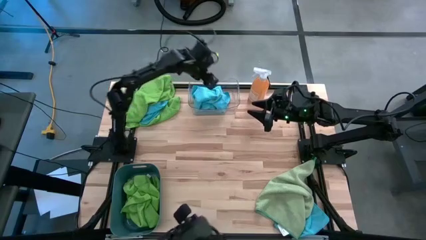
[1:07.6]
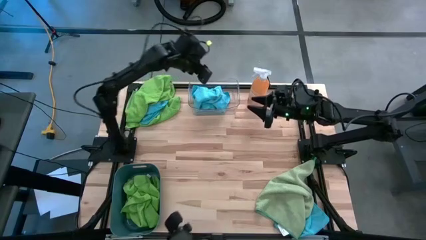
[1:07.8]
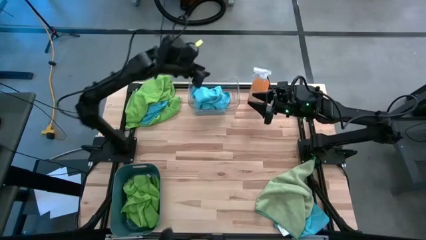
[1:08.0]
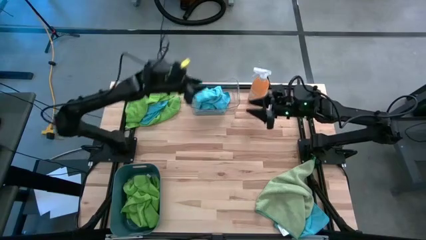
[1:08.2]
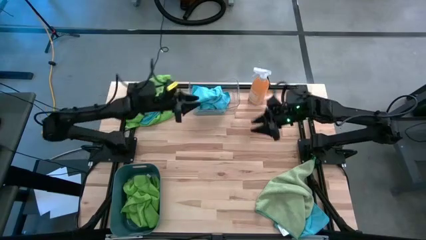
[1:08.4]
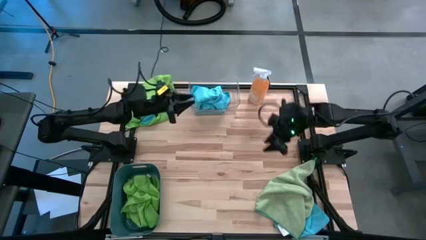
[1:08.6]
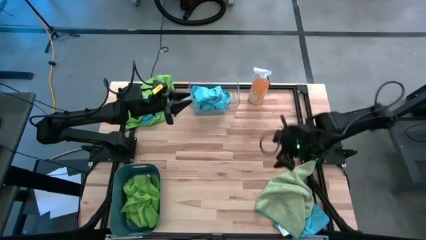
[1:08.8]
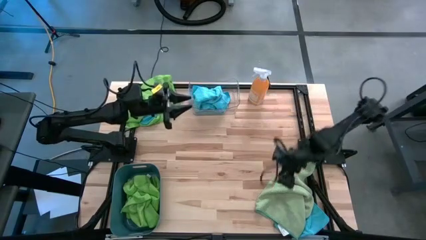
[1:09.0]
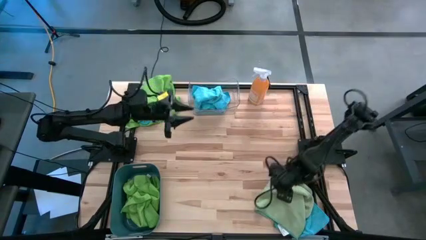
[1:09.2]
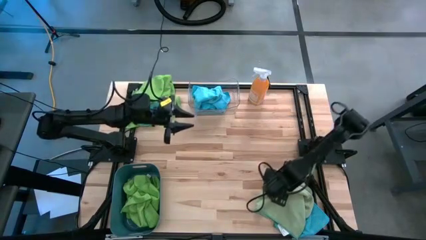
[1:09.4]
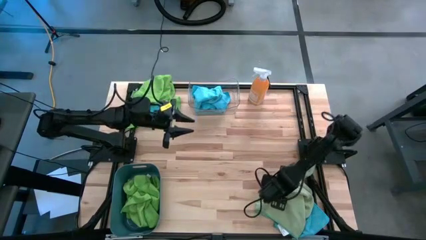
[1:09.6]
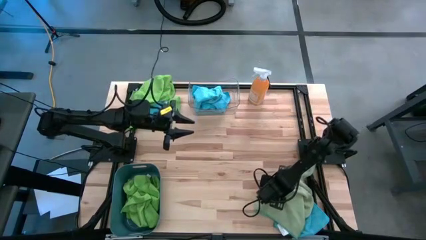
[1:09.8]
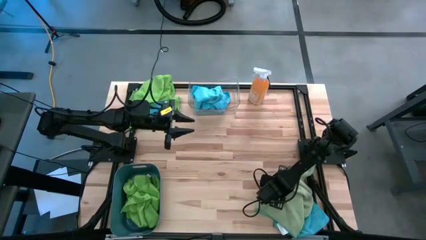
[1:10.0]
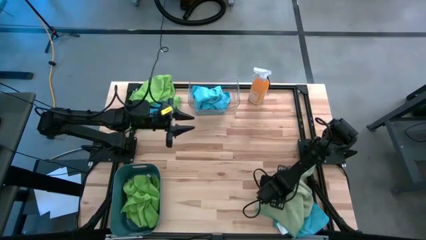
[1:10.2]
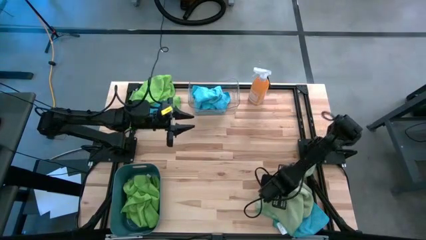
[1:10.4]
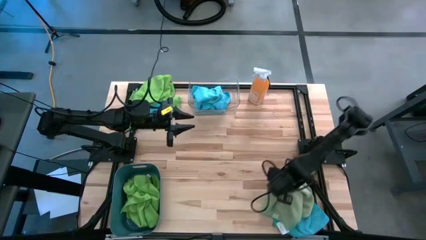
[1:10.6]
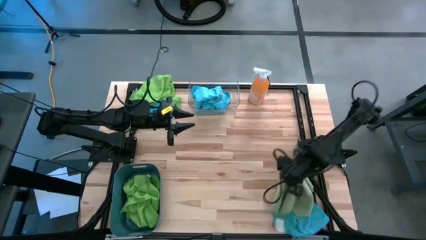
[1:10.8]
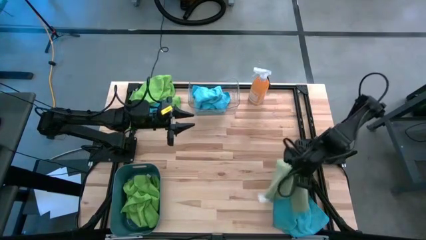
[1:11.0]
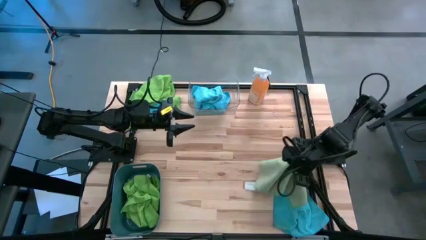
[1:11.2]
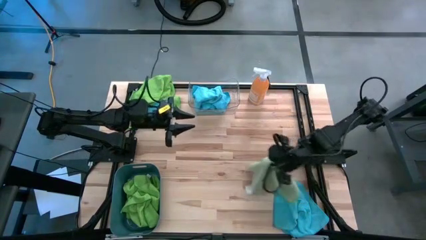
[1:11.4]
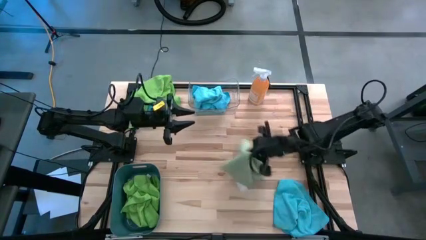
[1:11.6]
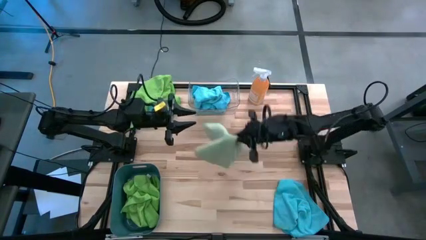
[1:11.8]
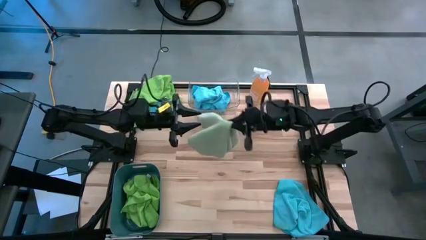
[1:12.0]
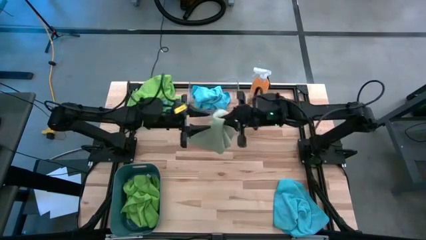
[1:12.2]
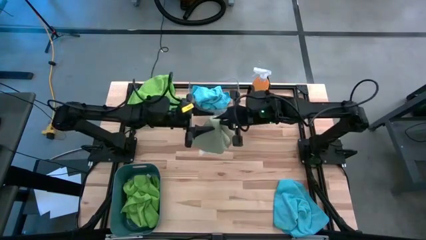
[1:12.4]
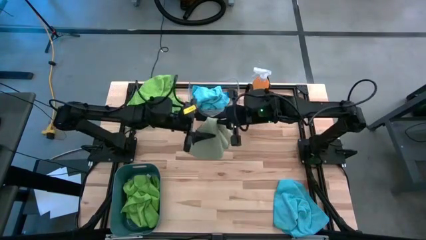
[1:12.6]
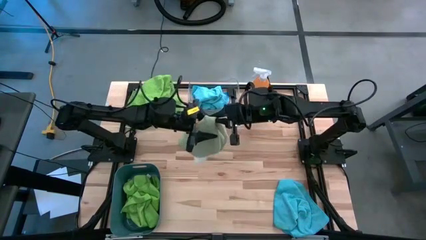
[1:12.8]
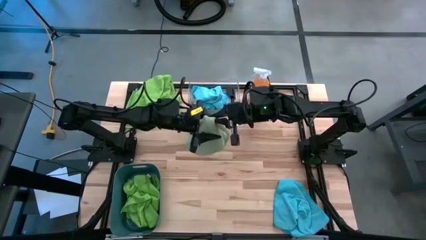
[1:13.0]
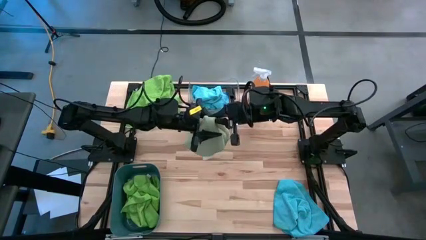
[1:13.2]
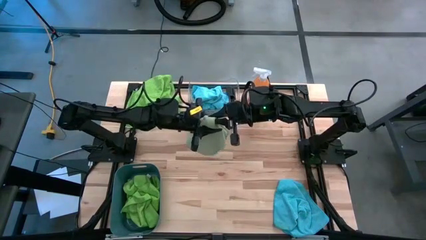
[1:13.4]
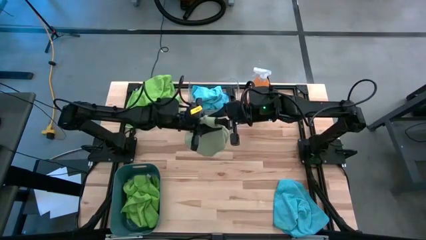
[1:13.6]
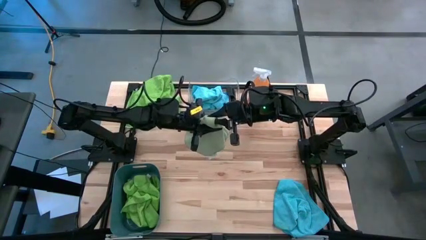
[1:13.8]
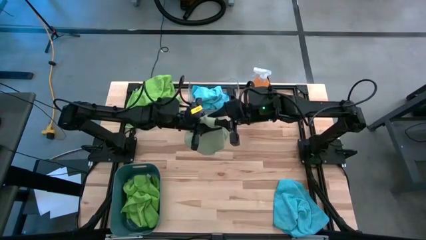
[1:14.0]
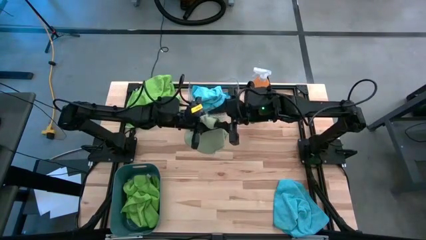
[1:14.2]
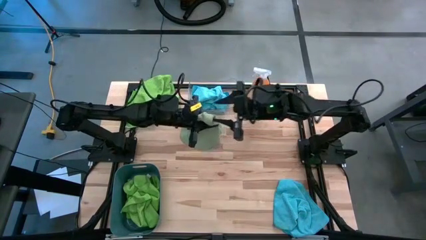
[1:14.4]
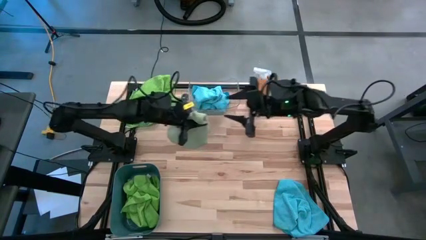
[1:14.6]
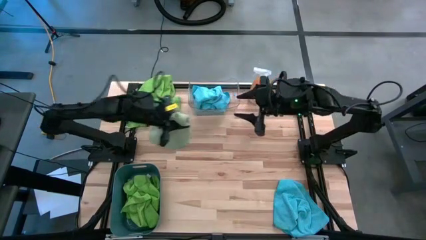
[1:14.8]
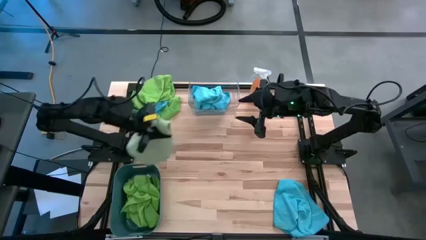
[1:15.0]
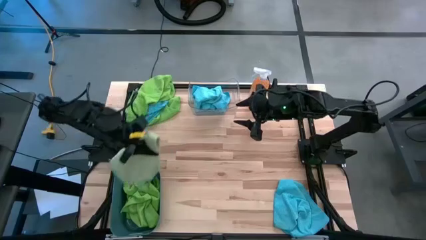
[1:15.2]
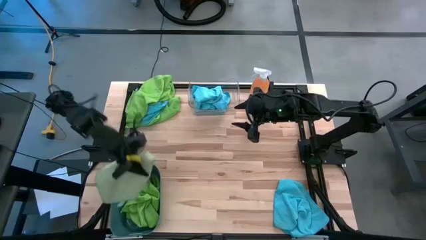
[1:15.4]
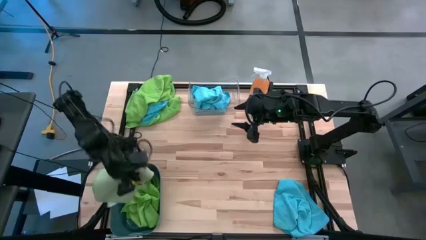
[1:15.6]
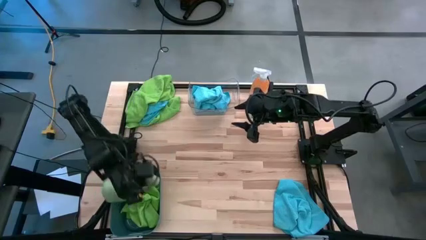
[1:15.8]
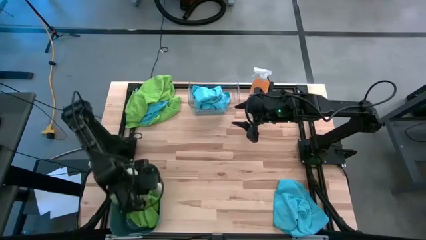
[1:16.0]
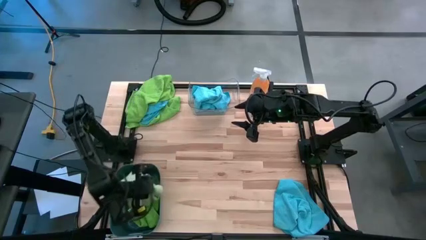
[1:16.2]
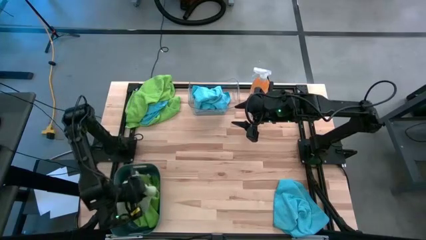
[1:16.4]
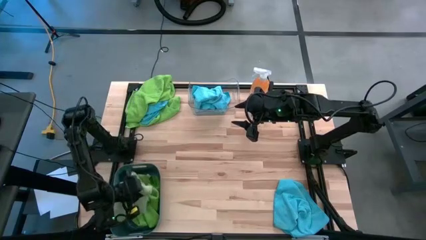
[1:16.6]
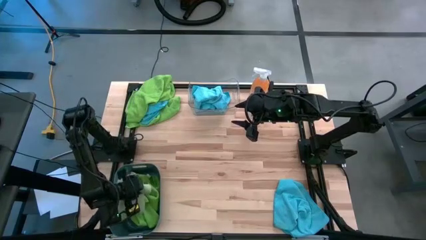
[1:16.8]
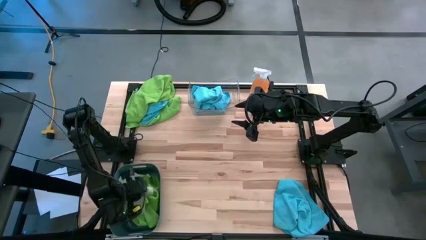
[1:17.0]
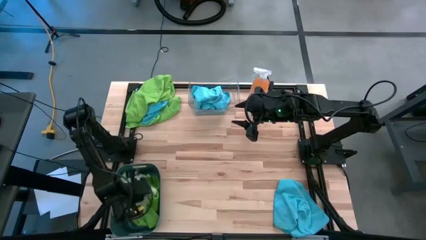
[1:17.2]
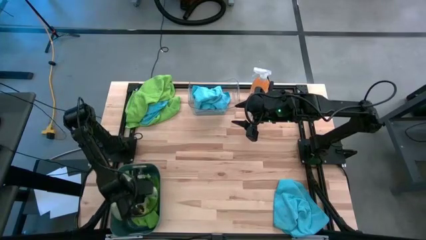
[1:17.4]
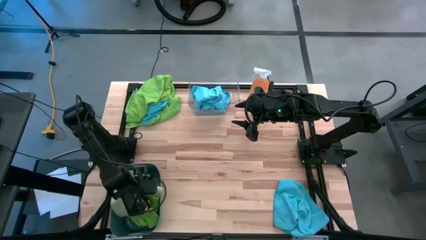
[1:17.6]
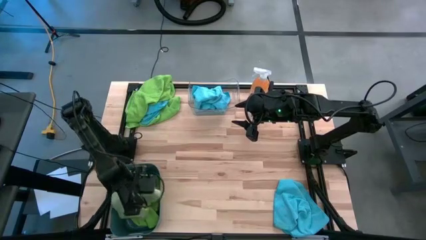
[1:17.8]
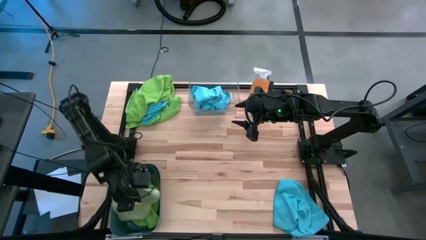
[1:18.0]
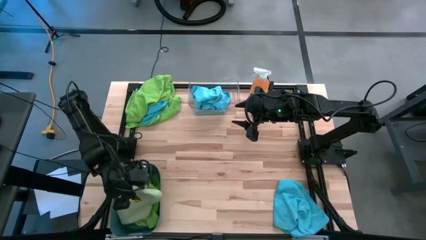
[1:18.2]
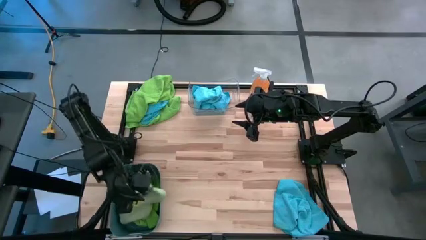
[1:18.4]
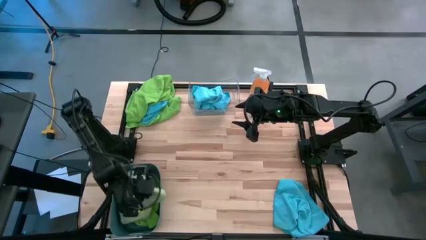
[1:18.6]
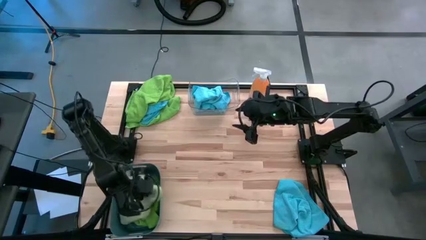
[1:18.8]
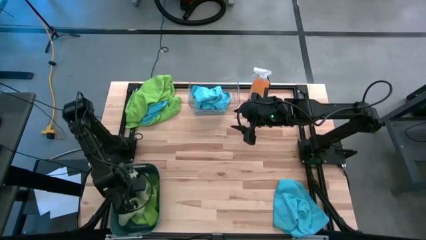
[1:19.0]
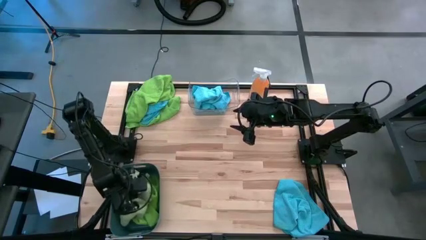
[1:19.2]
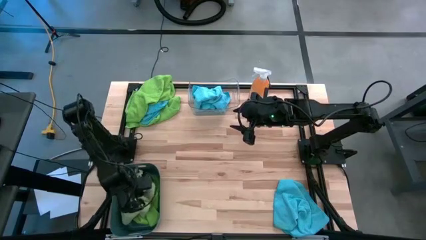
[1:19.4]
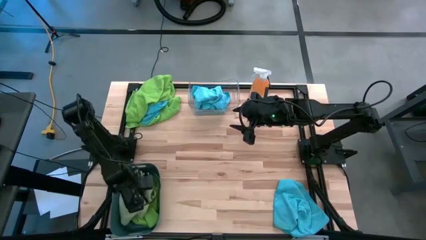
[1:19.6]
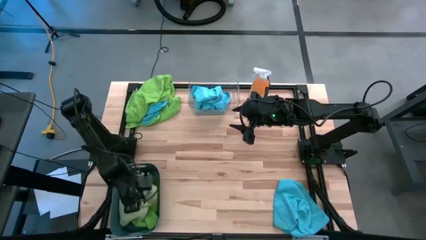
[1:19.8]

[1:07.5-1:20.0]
Task: Sort microfiber towel by color & place in baskets
Put the light green microfiber towel into the blue bin

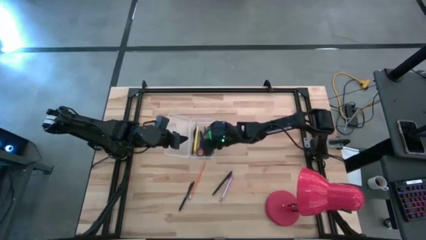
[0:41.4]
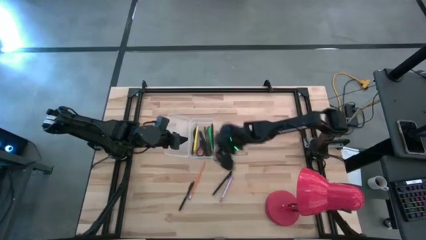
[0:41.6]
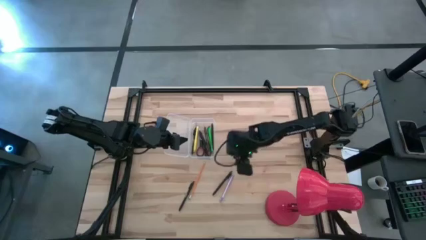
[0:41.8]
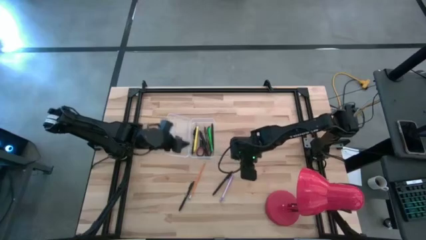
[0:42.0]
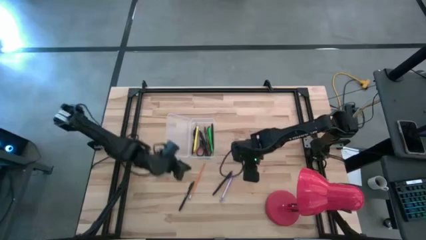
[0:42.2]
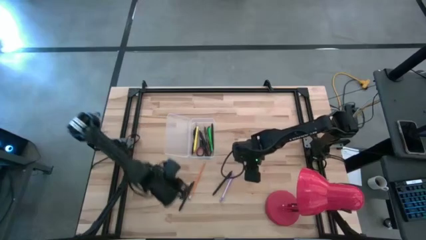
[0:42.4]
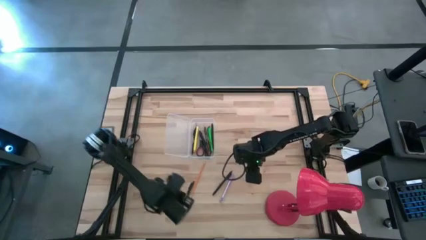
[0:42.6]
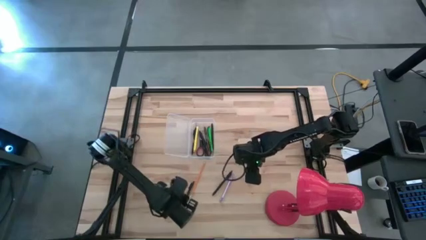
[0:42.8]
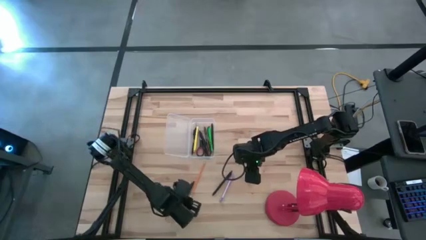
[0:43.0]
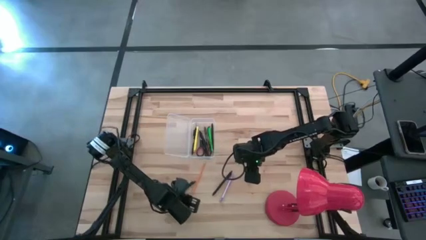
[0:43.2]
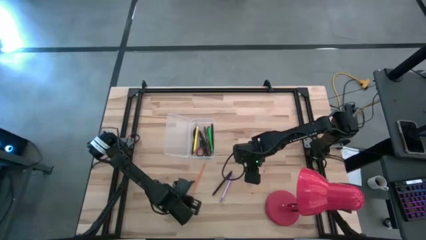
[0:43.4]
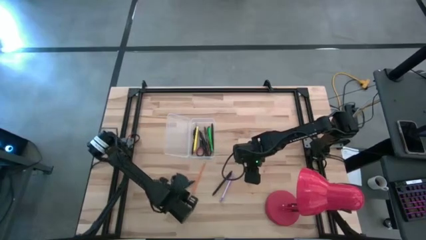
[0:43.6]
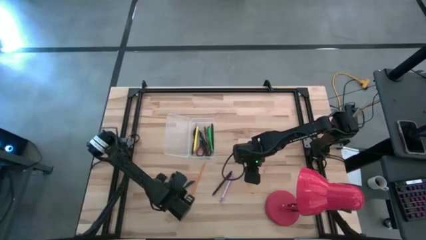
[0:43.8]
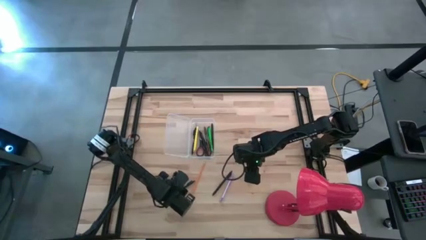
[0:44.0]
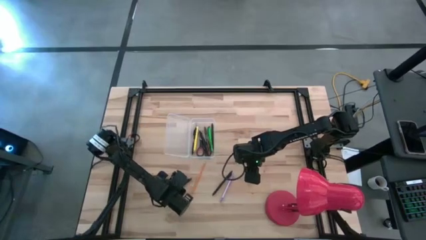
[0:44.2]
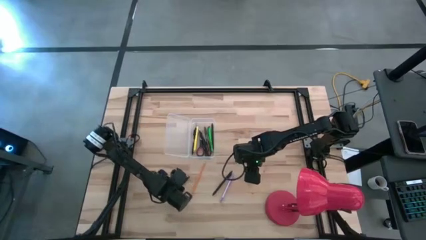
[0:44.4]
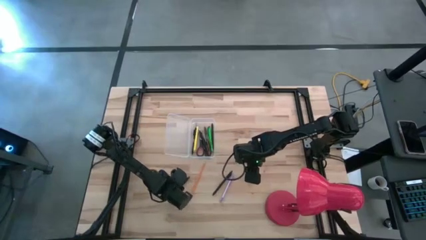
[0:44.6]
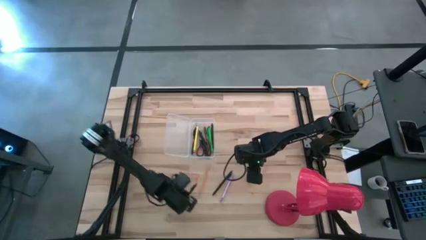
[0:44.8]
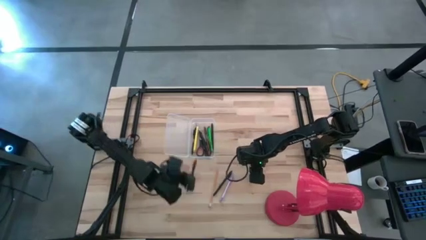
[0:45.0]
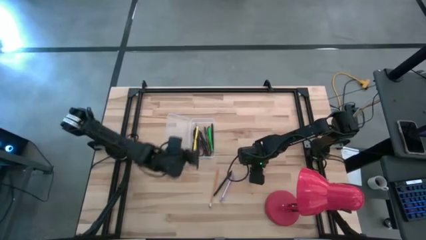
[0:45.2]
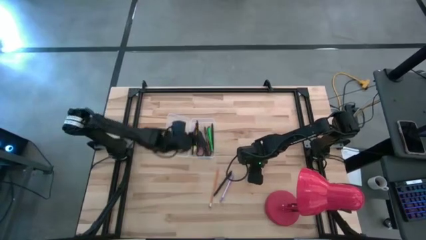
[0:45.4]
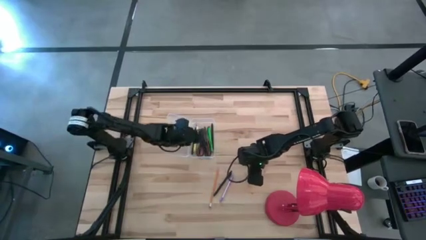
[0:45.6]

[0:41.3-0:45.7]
Task: Pick & place school supplies into a supply box
Put the black pen into the transparent supply box

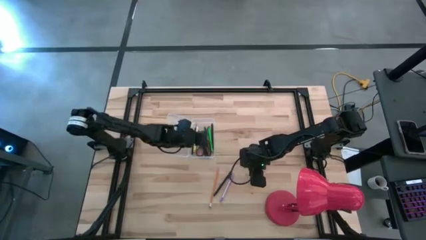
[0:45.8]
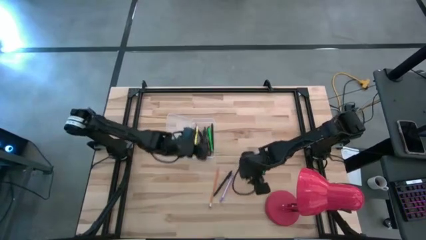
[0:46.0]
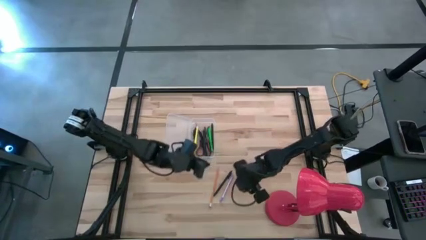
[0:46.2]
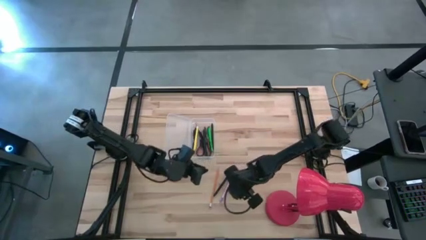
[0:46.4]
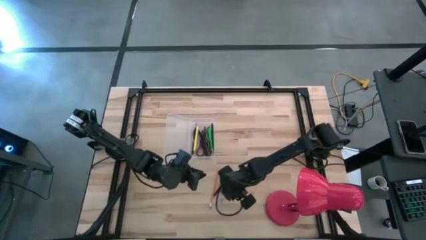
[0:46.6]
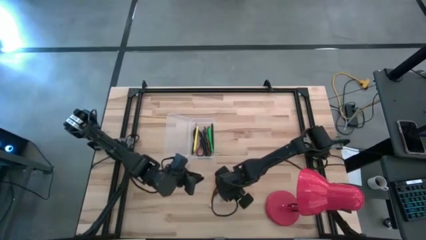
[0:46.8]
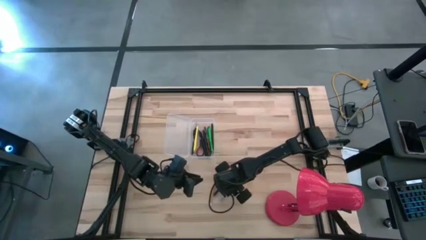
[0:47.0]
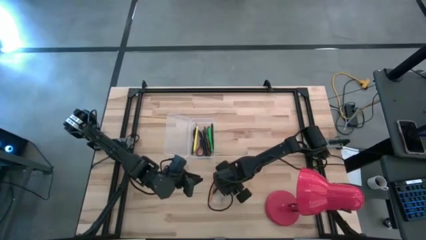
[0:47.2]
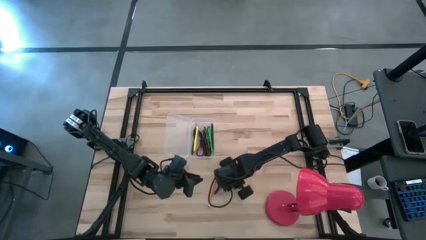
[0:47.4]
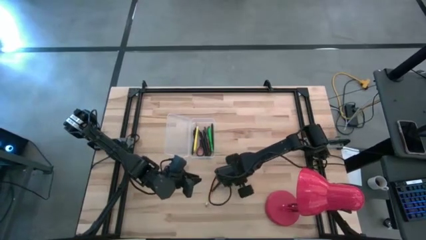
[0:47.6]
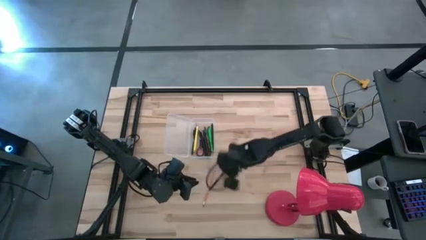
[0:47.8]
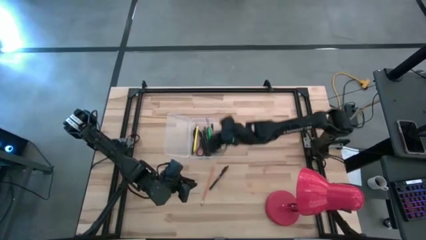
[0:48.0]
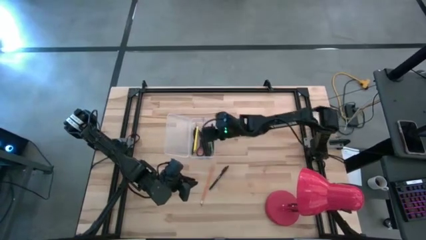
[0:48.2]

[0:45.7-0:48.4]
Put the pink pen into the transparent supply box
